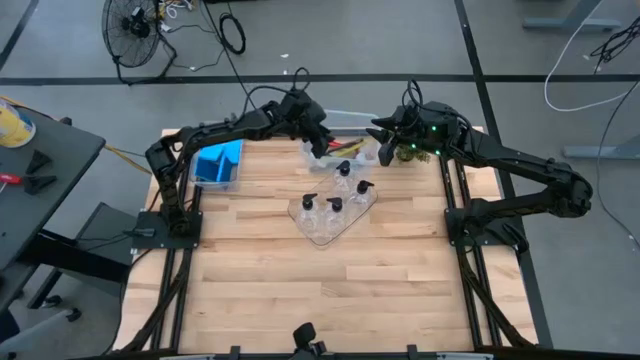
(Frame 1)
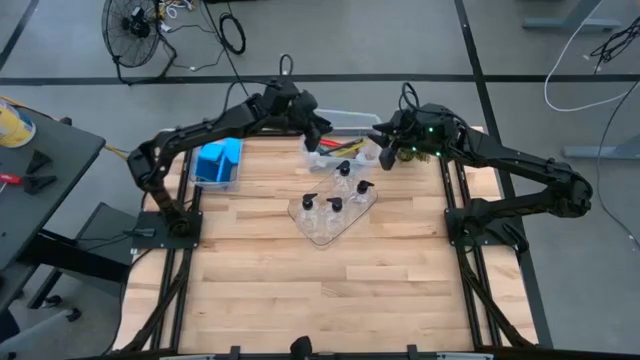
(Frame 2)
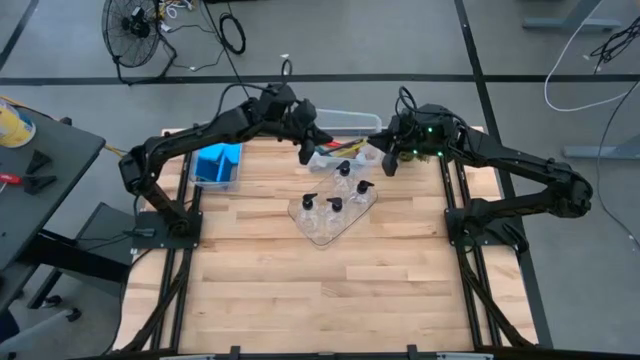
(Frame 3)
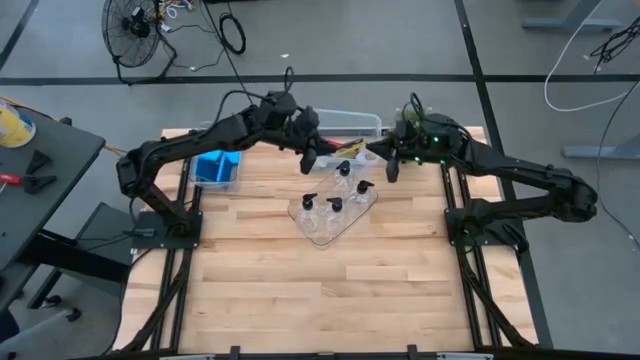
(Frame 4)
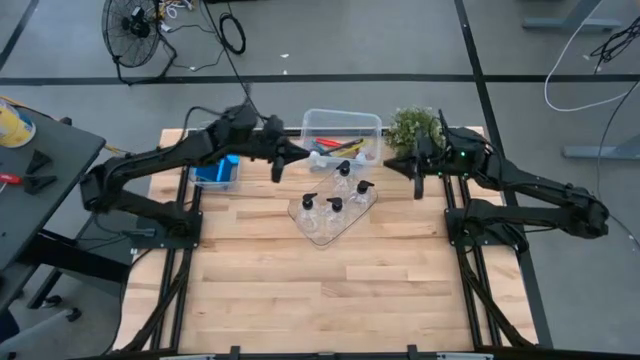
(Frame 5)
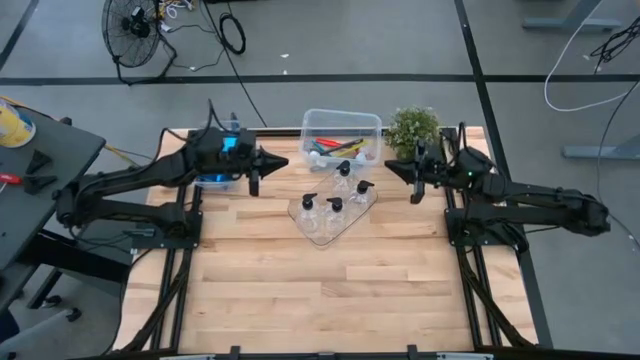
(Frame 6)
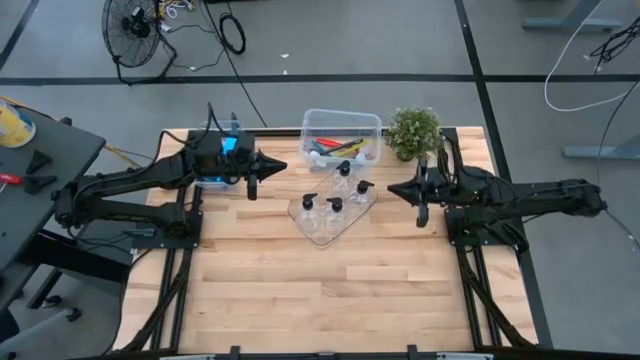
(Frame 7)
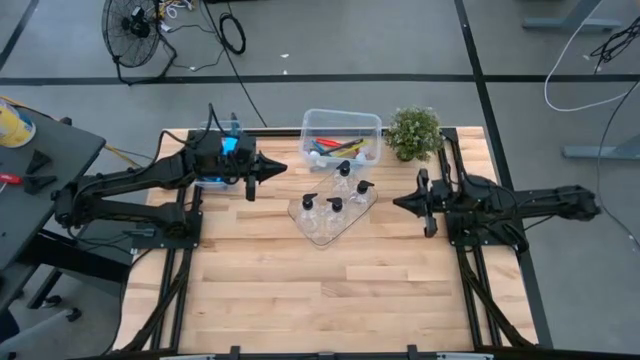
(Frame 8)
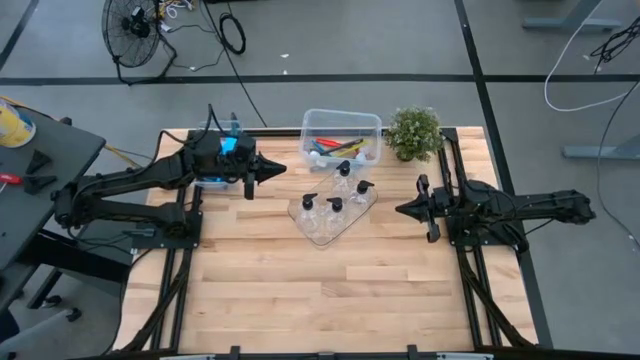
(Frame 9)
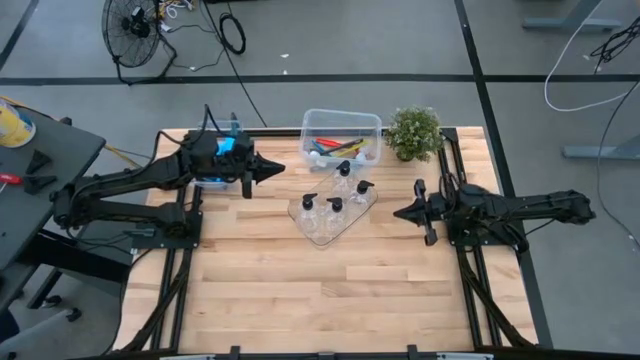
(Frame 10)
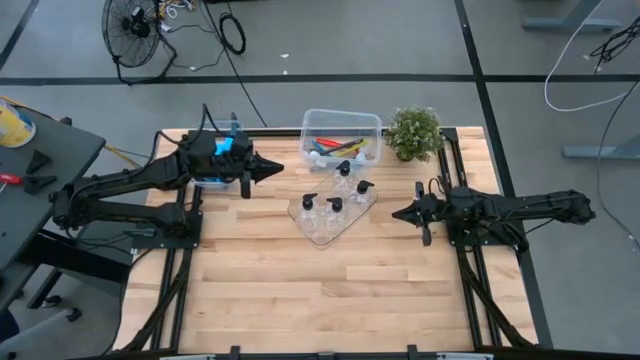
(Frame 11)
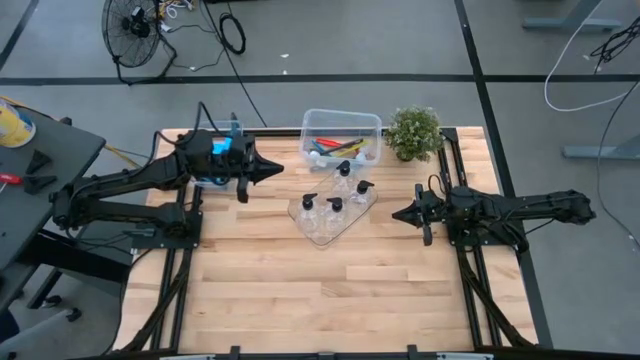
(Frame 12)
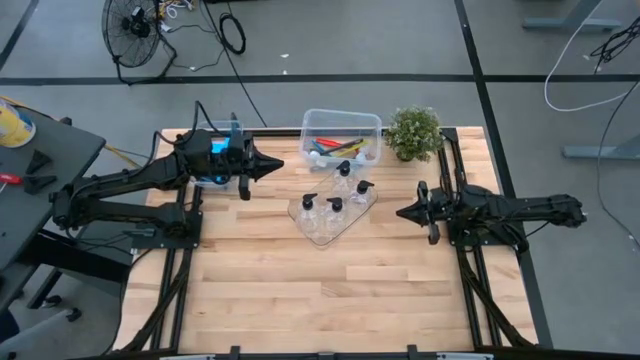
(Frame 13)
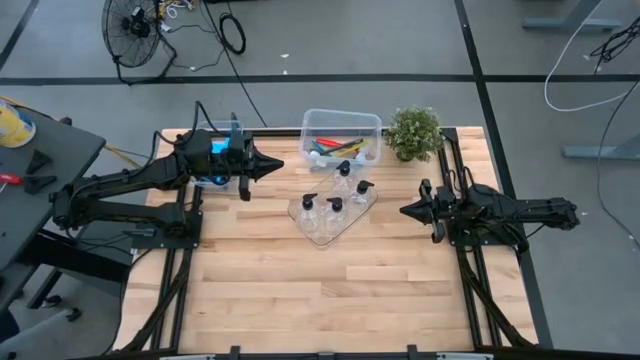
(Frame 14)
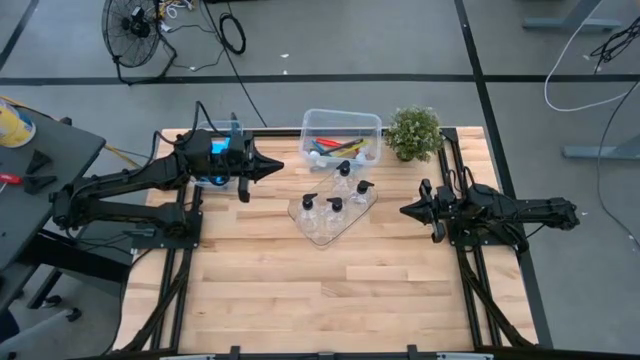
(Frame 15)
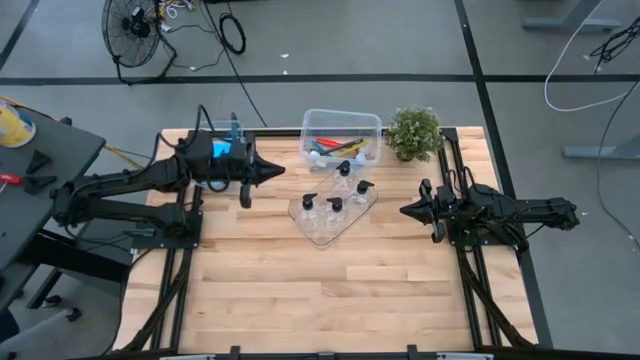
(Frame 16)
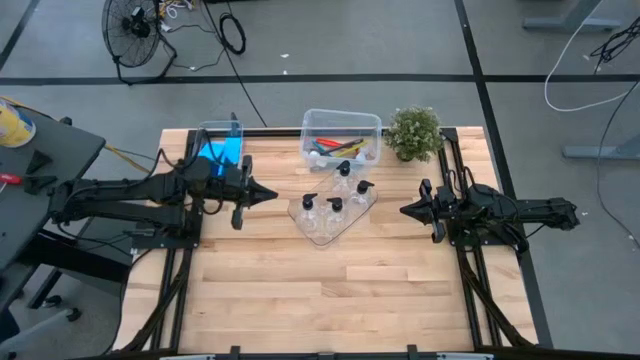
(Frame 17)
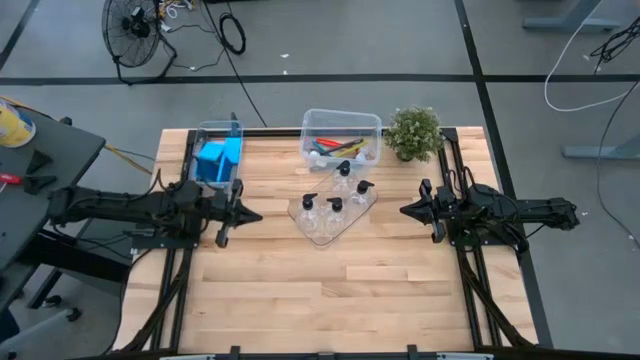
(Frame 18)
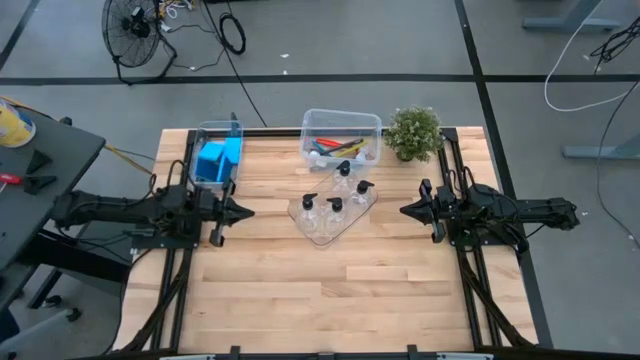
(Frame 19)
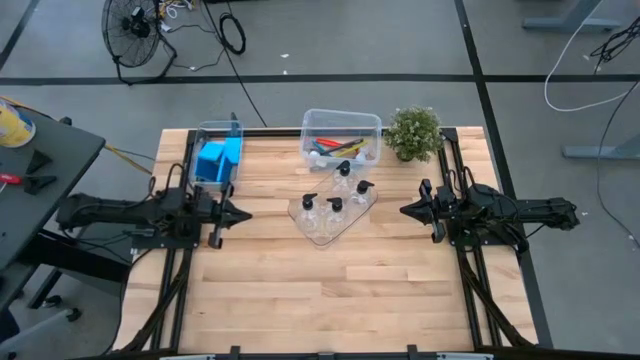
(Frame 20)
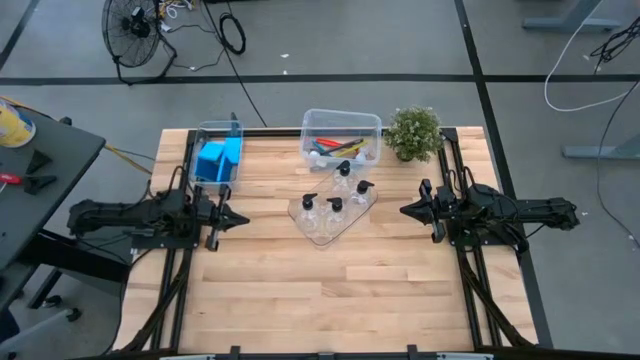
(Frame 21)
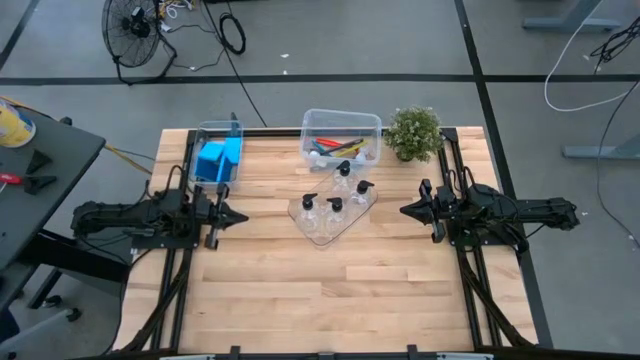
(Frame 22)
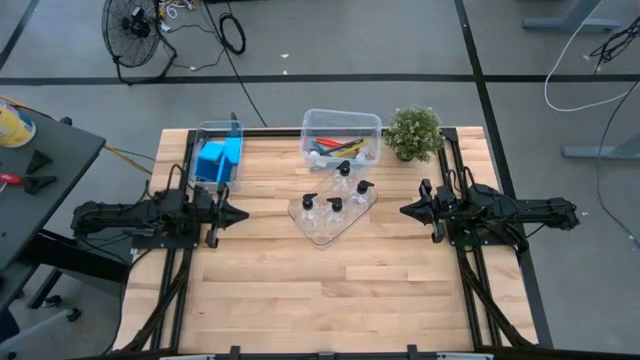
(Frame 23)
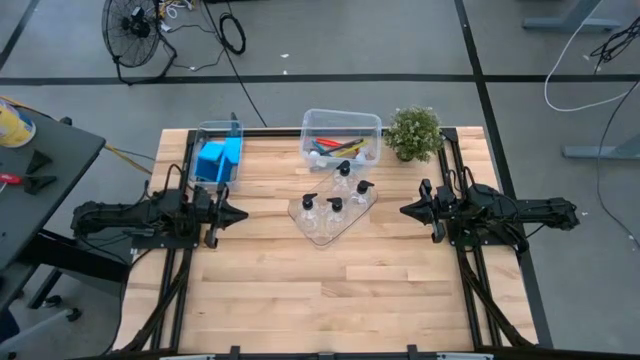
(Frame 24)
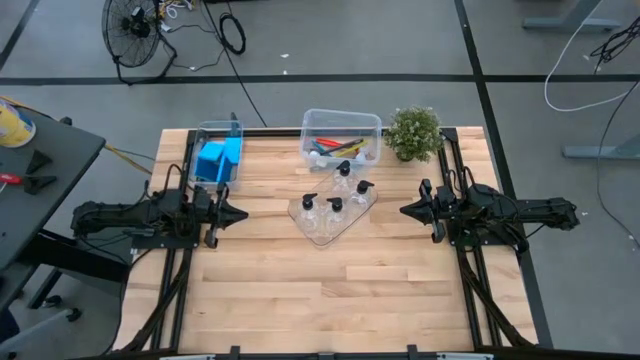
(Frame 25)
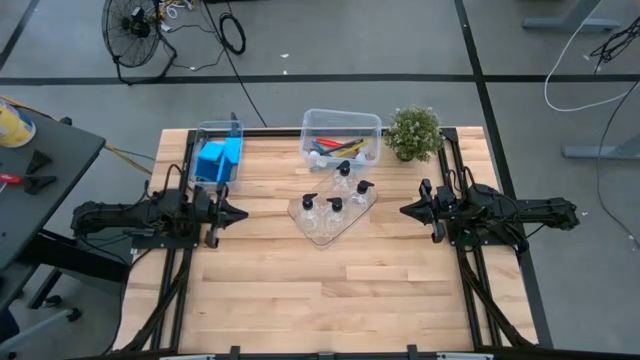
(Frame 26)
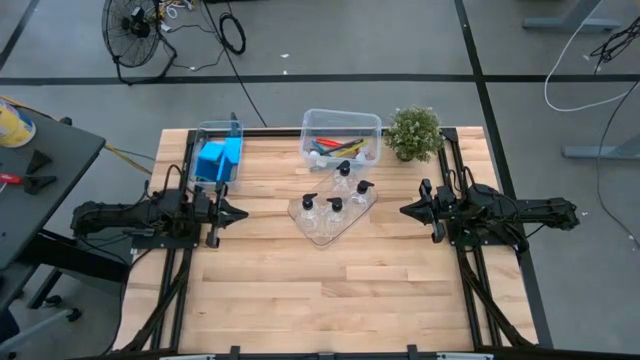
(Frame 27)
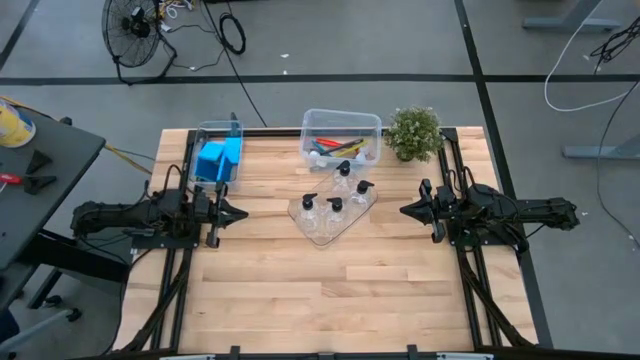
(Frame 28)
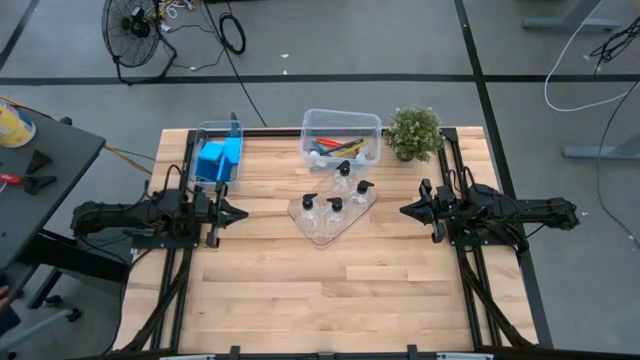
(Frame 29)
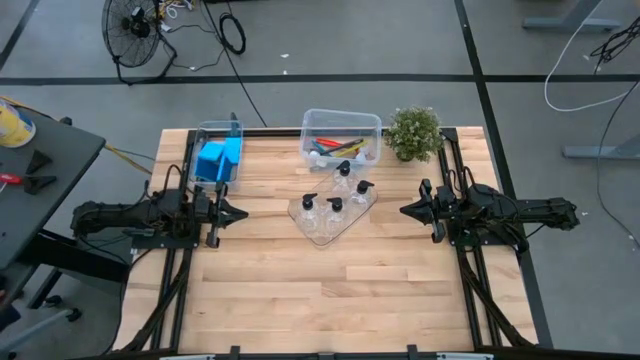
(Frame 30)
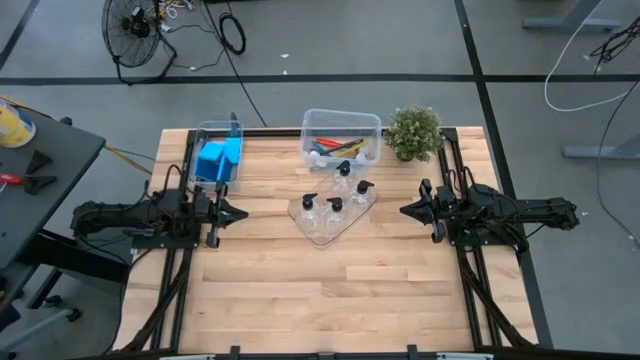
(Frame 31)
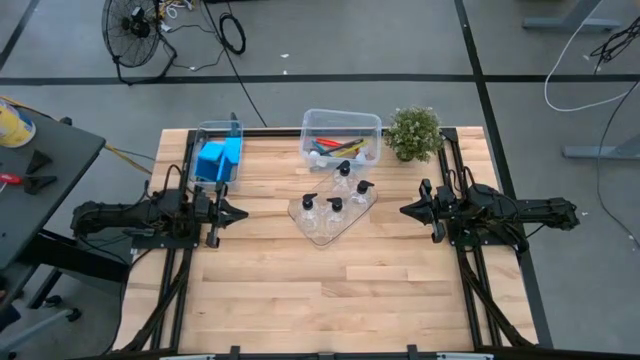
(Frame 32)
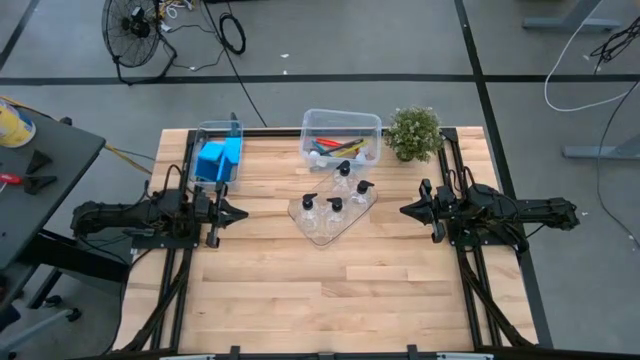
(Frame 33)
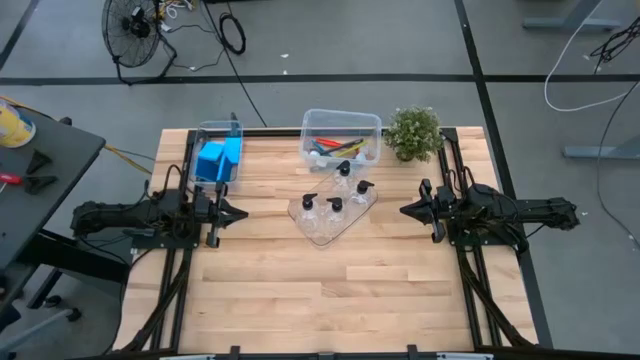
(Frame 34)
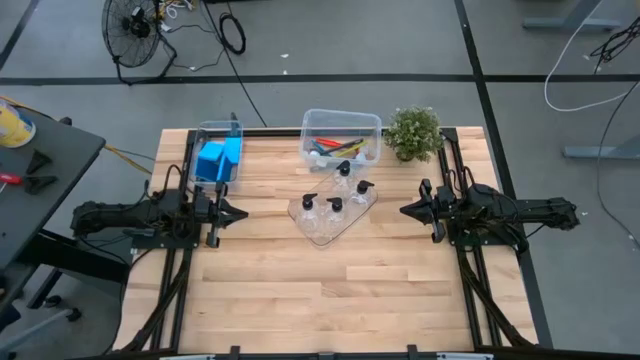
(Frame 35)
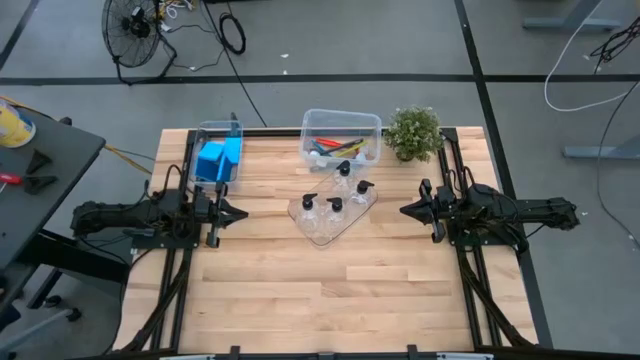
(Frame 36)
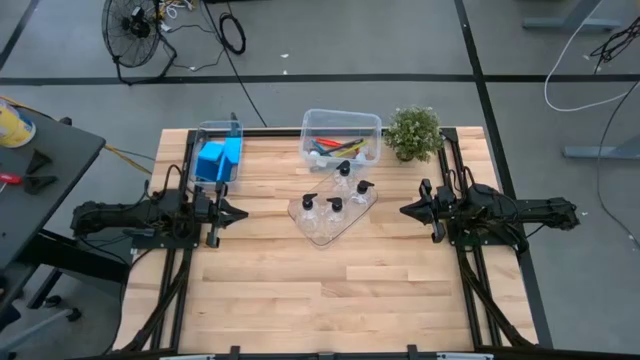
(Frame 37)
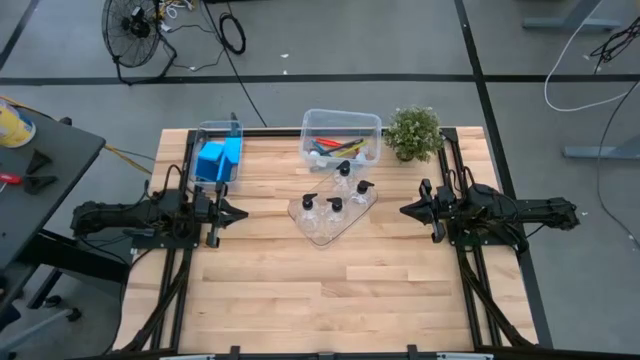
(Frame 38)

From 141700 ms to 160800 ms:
Task: Pick & Place Kitchen Sink Supplies
Return to Home Position

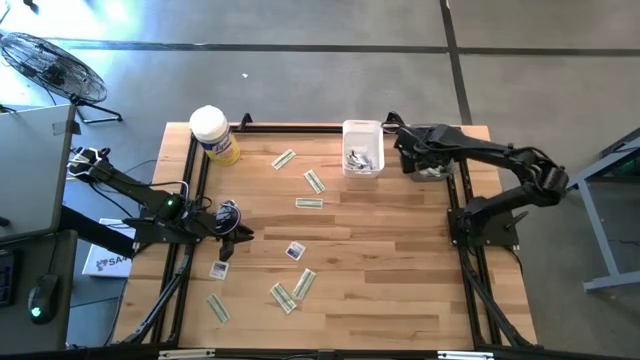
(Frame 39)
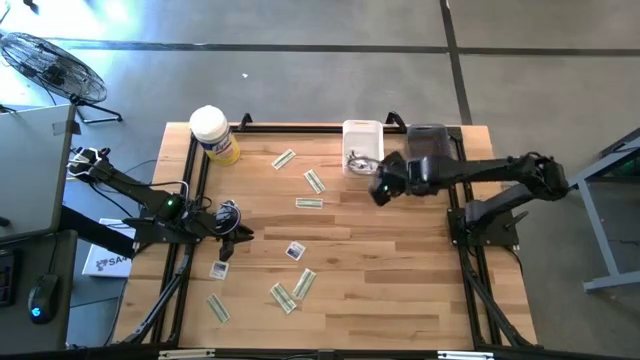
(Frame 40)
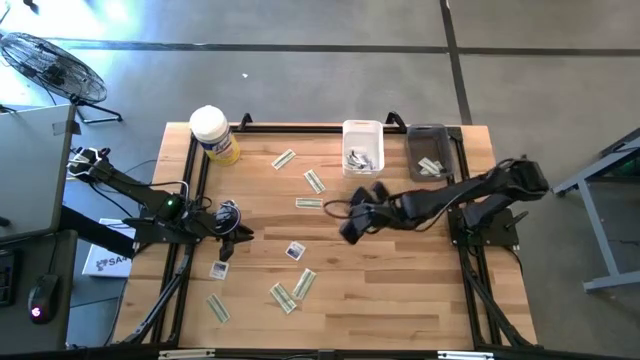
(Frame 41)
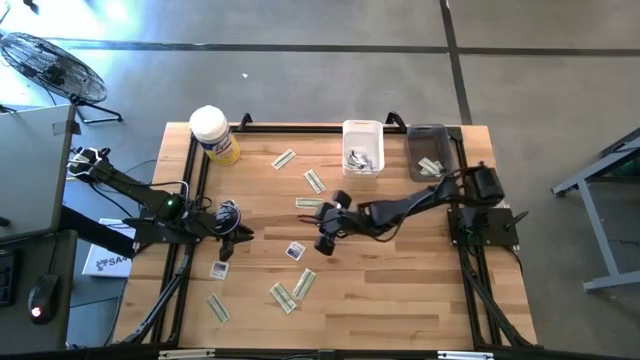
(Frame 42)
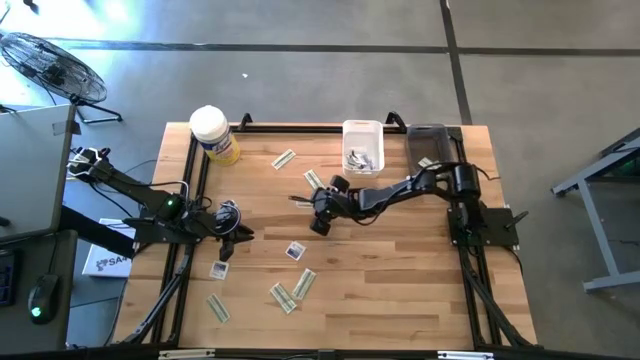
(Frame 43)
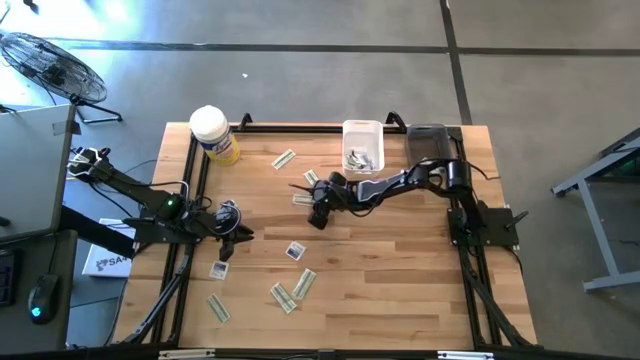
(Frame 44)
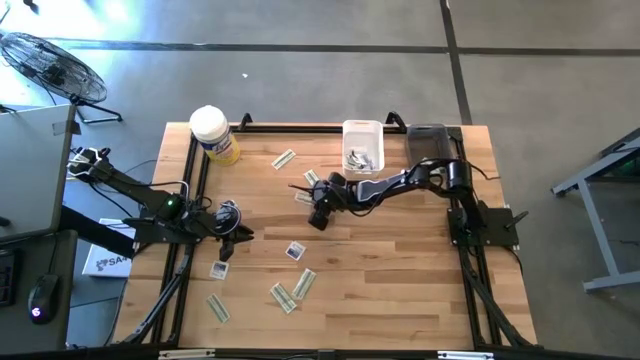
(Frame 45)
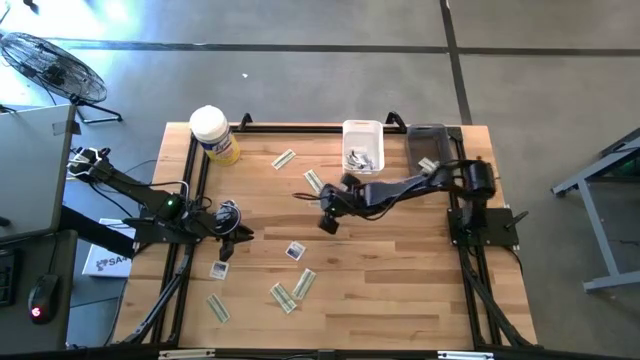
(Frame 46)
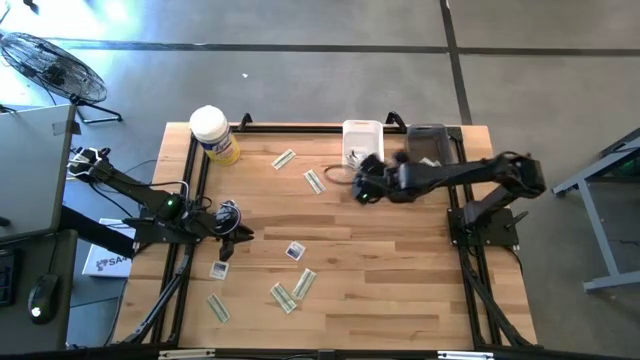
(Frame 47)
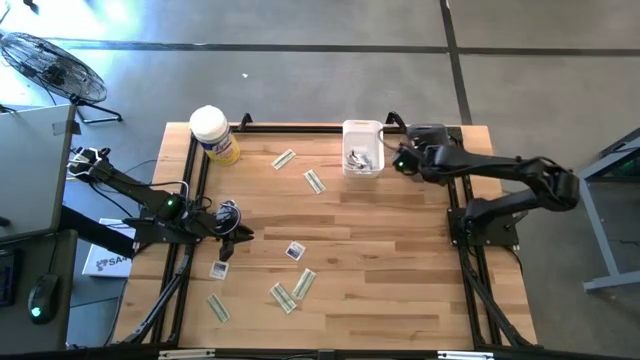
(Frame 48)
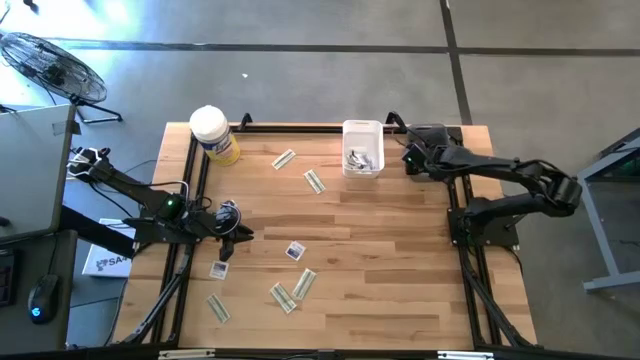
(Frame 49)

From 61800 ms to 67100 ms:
Task: Pick & Place First Aid Supplies
Put the green bandage into the black bin
